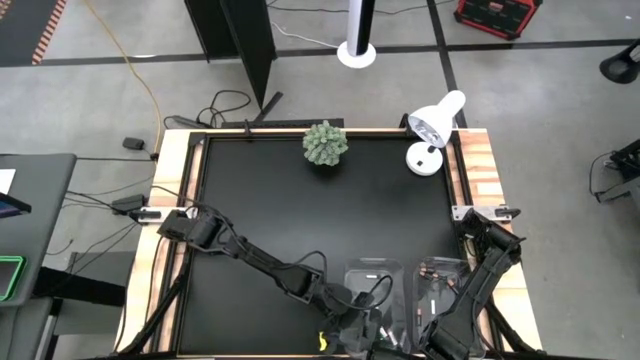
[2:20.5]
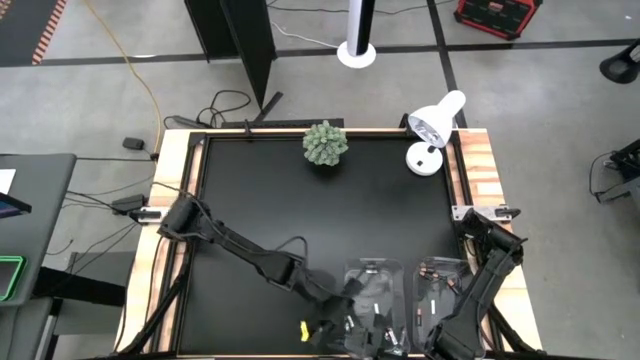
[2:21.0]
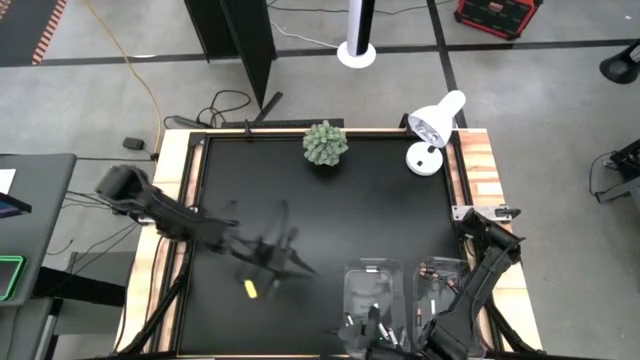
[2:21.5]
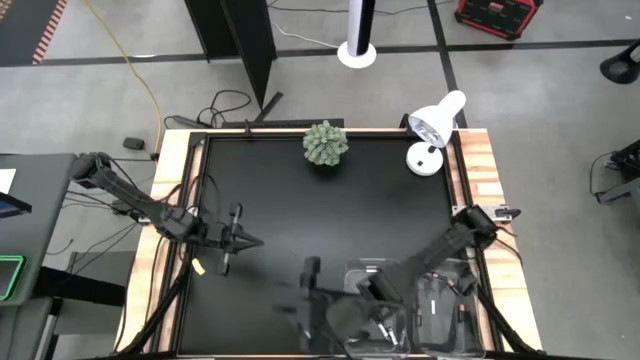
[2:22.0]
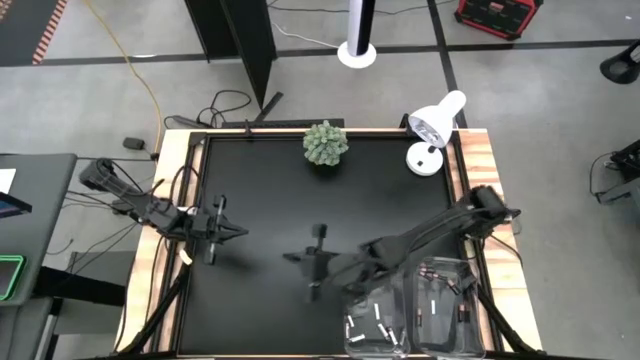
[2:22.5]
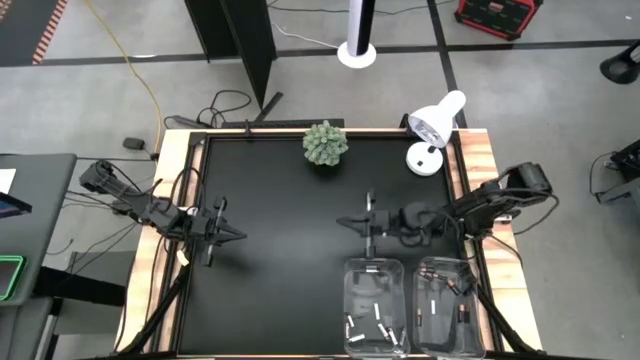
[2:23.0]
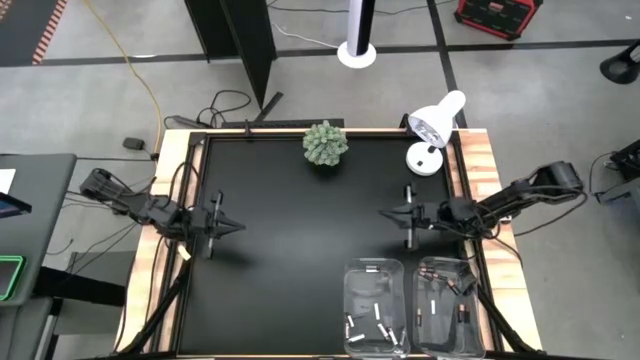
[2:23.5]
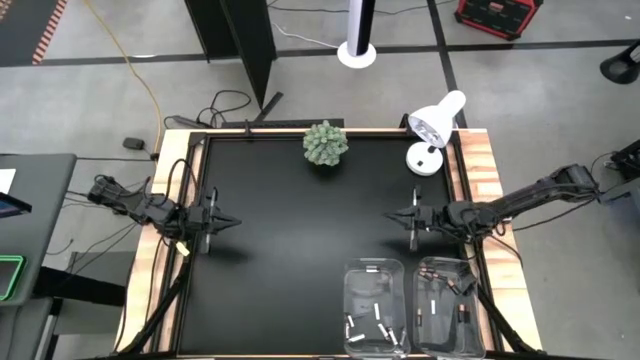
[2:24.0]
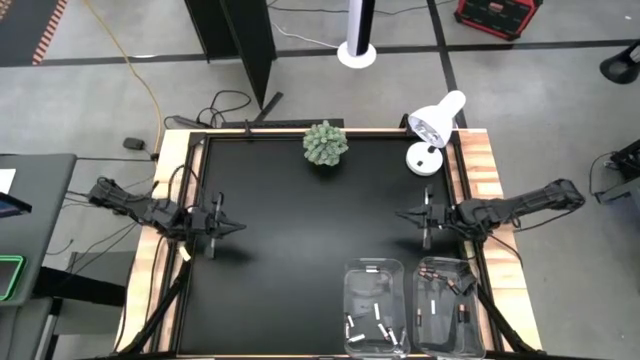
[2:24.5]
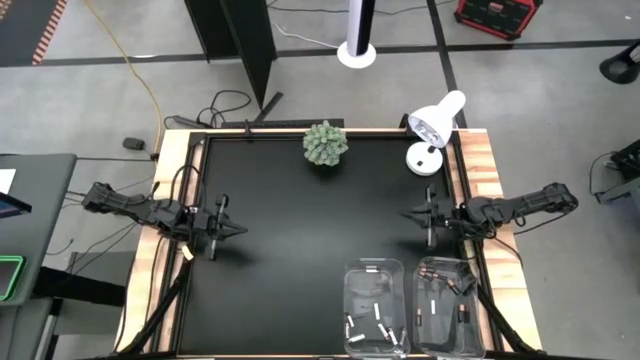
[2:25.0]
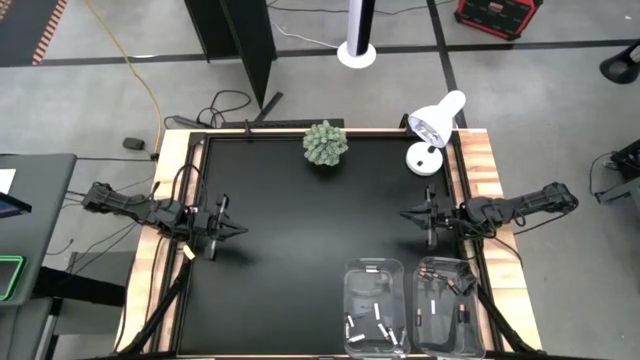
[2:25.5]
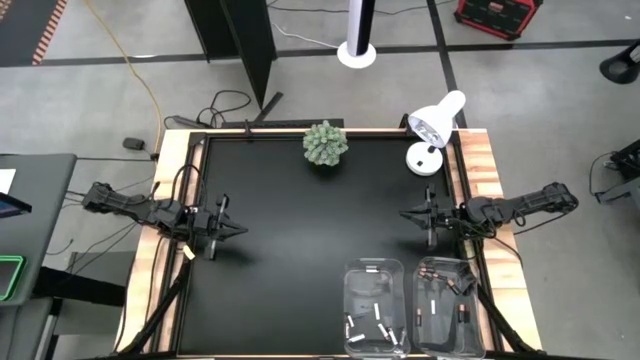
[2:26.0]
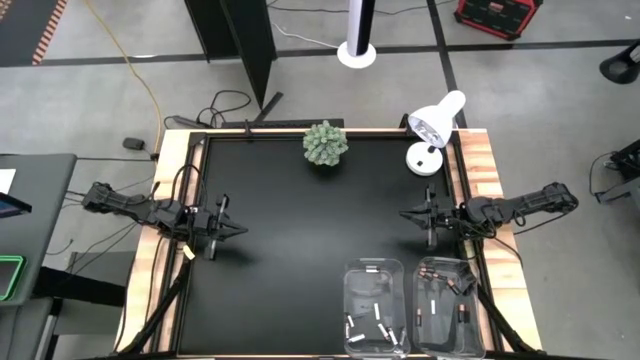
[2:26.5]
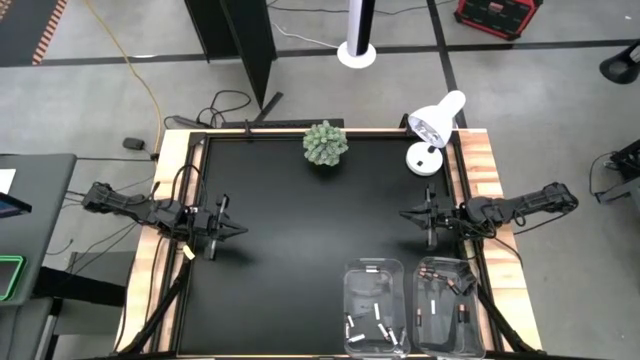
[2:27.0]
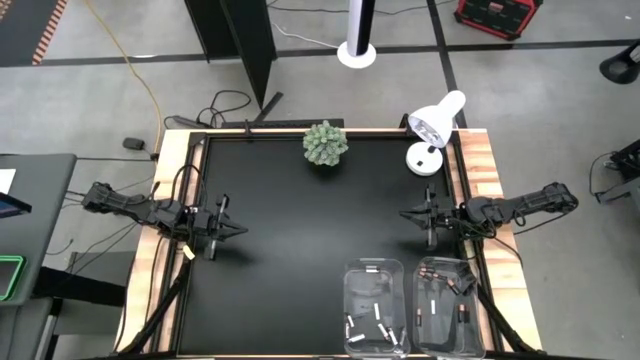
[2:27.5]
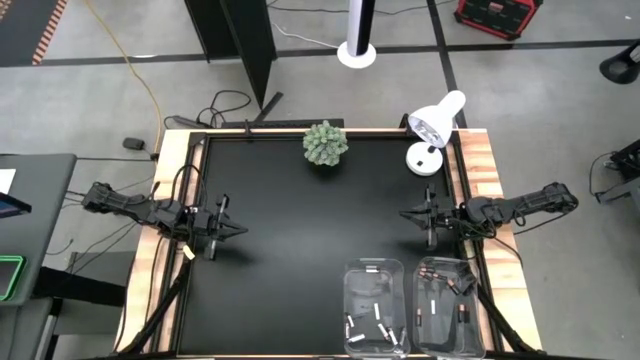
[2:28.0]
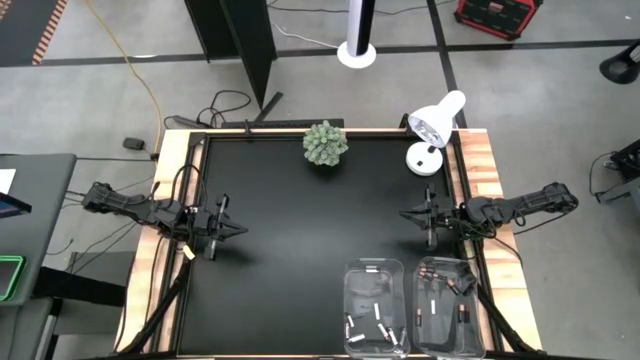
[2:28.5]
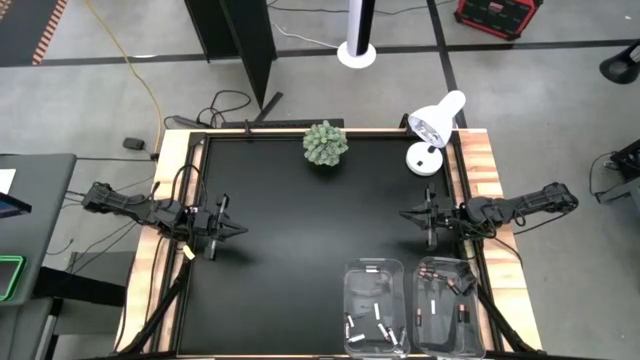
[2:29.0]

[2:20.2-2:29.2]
Task: Sort batteries
Return to Home Position

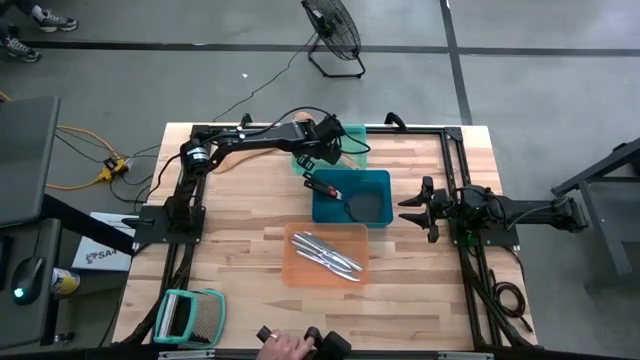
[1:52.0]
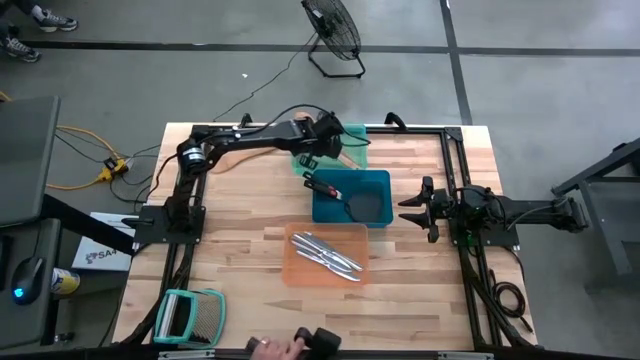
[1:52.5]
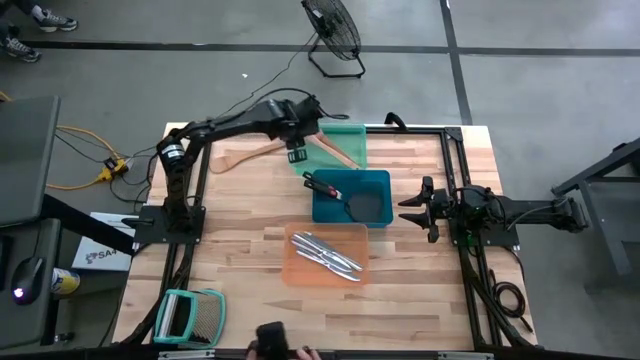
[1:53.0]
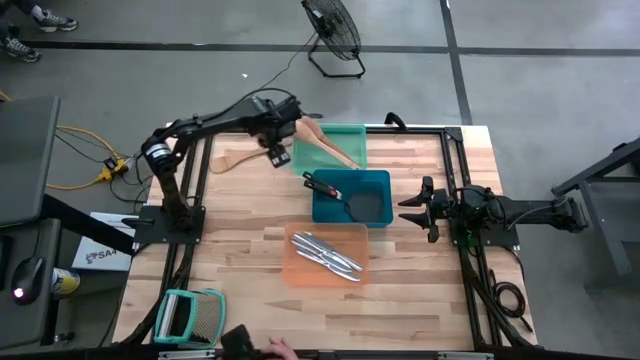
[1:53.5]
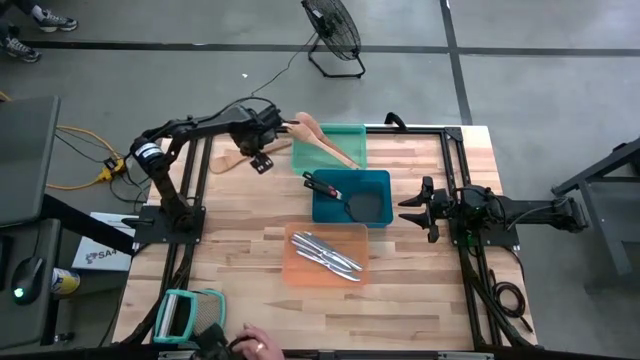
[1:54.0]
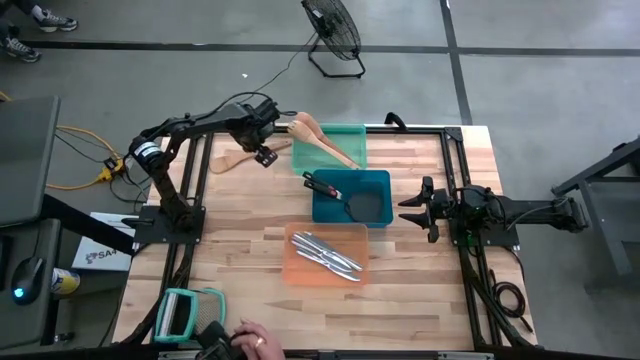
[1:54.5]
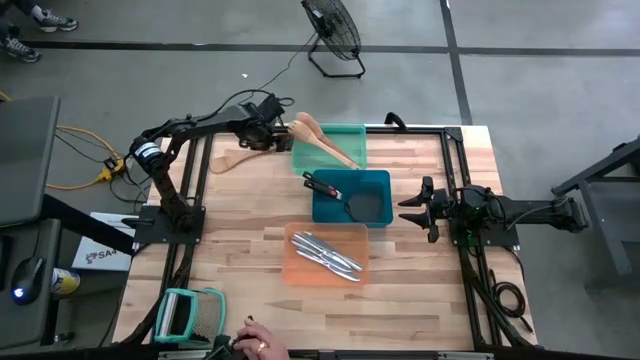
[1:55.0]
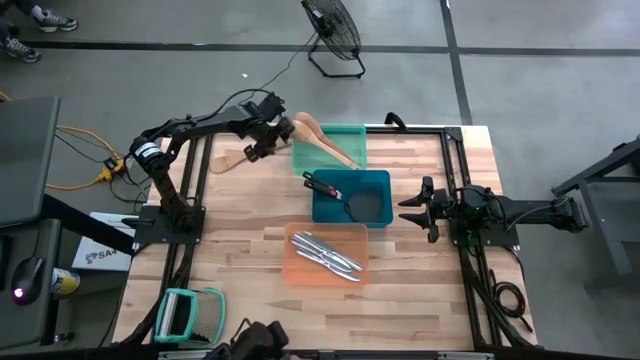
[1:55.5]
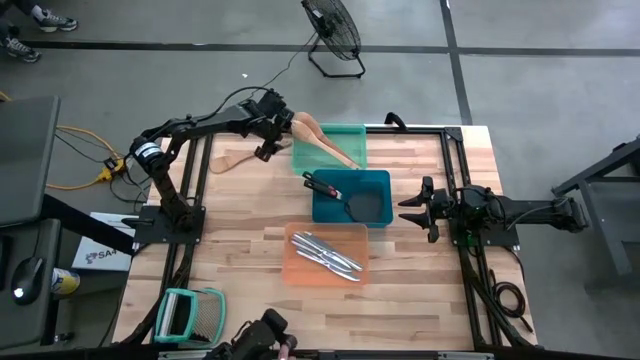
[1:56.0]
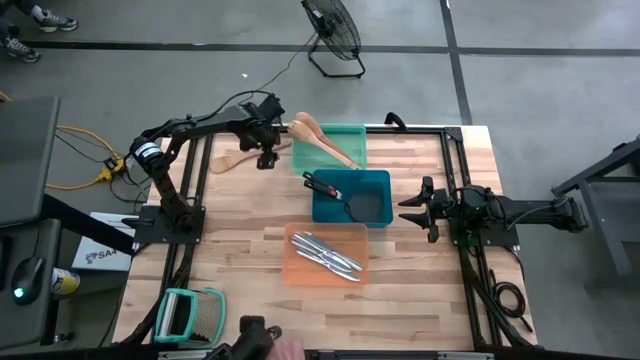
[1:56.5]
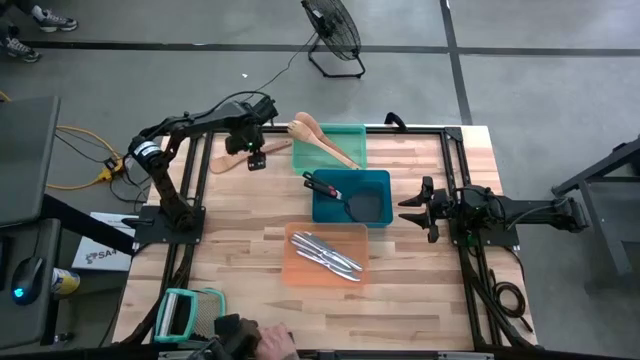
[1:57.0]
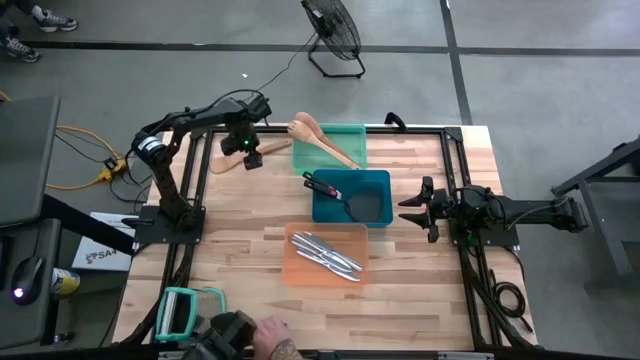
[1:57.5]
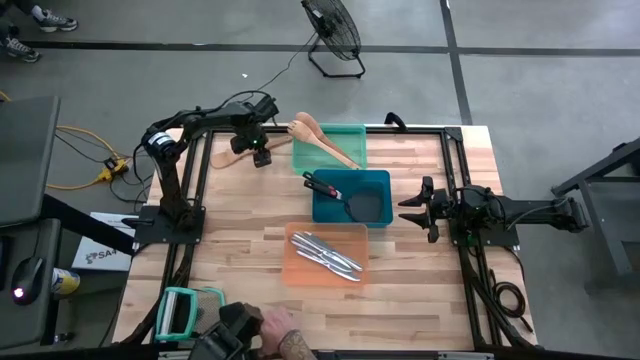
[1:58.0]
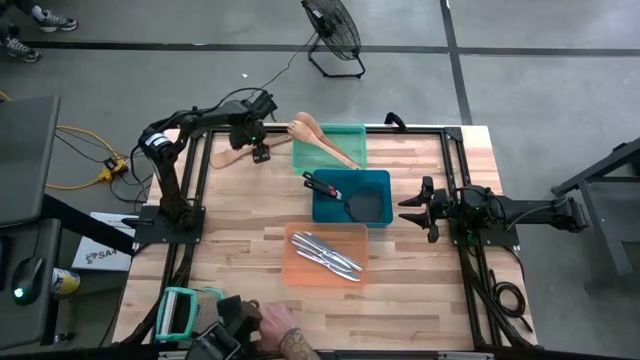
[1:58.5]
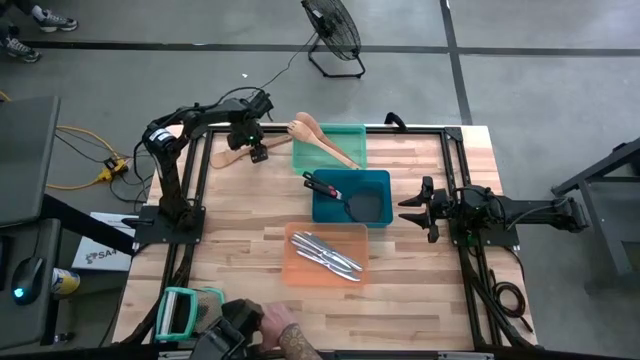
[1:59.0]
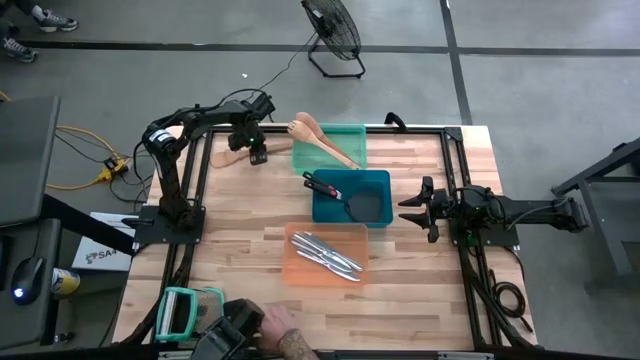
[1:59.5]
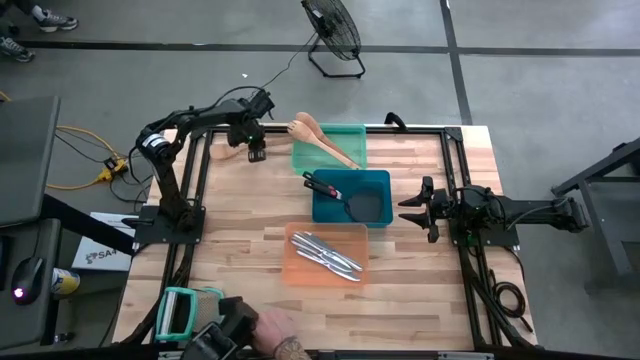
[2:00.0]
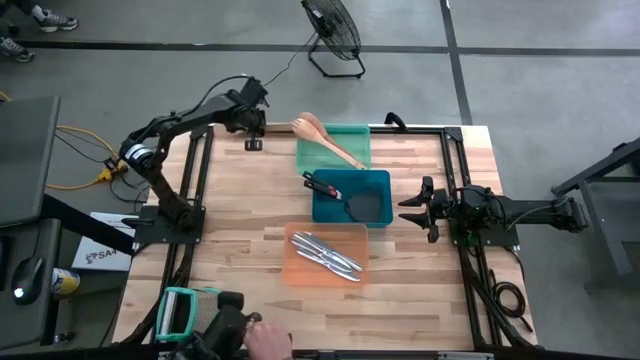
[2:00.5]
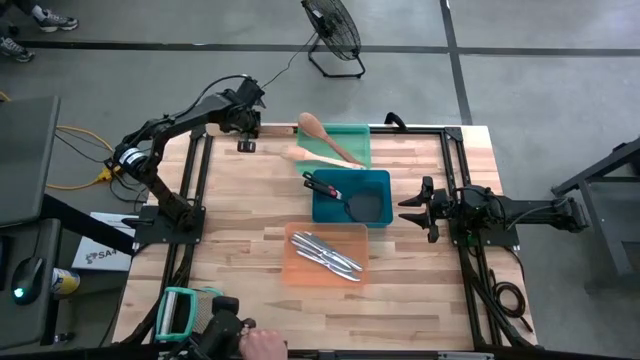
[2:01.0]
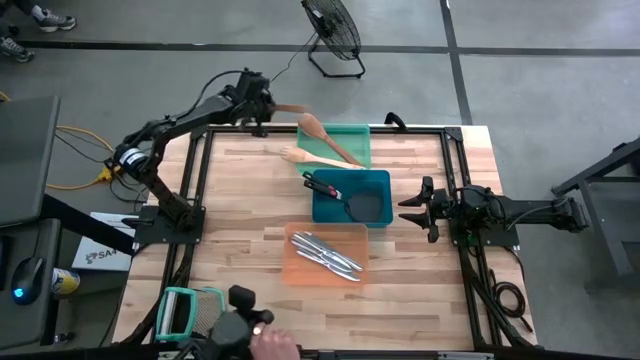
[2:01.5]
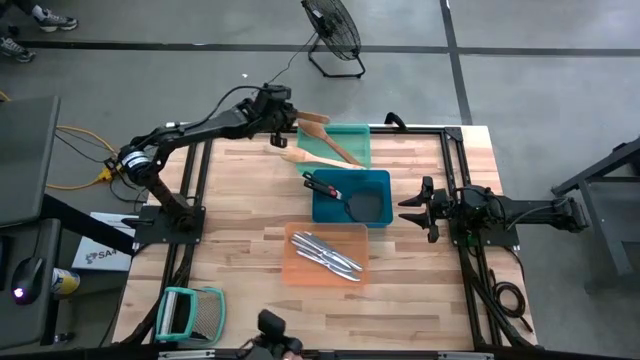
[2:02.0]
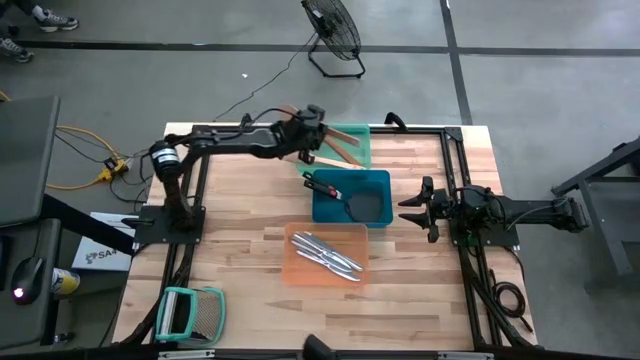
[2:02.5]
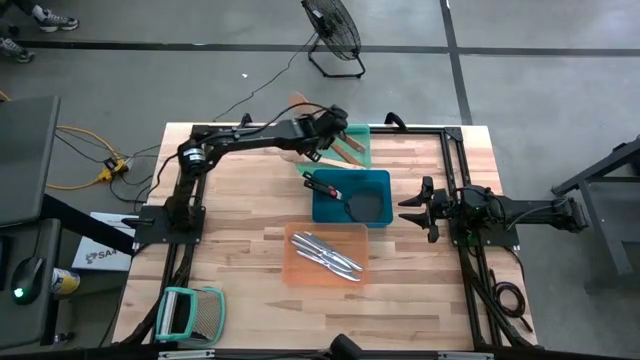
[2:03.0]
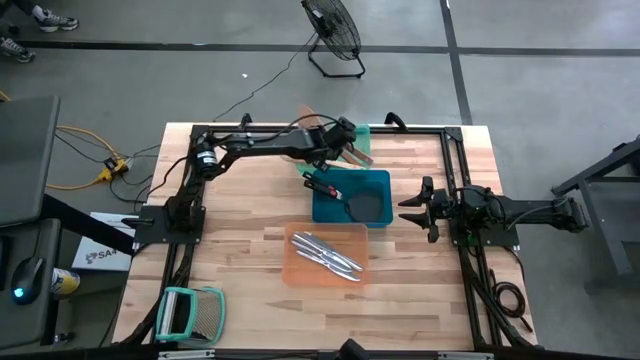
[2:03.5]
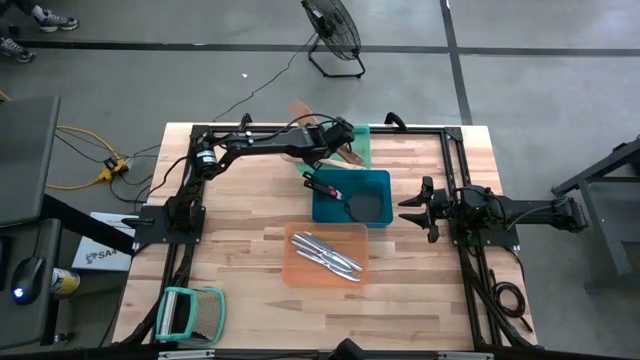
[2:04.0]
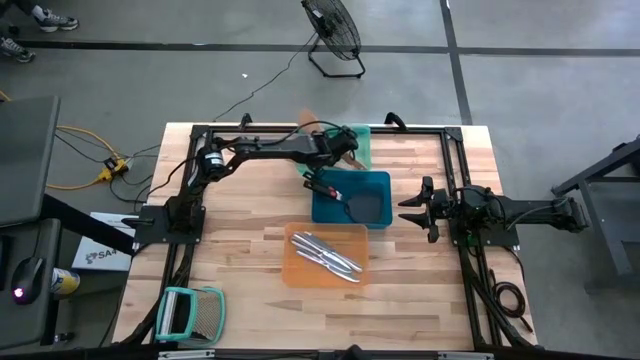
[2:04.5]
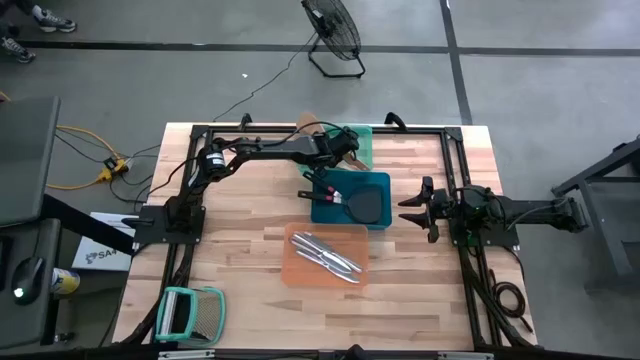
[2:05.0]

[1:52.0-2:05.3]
Task: Pick & Place Kitchen Items
Put the wooden serving spoon into the green bin
